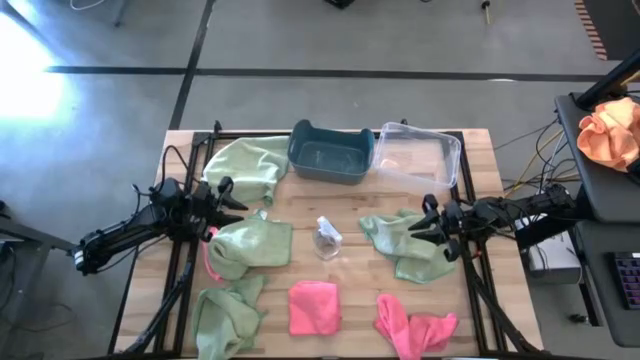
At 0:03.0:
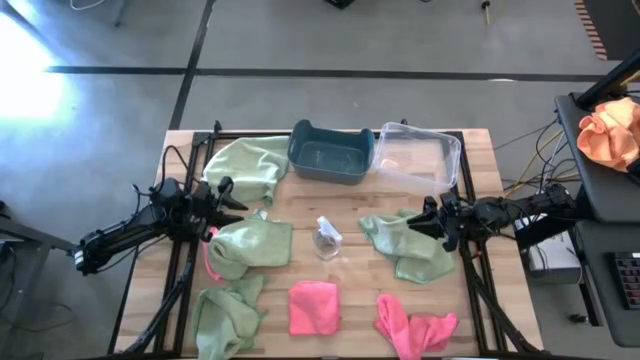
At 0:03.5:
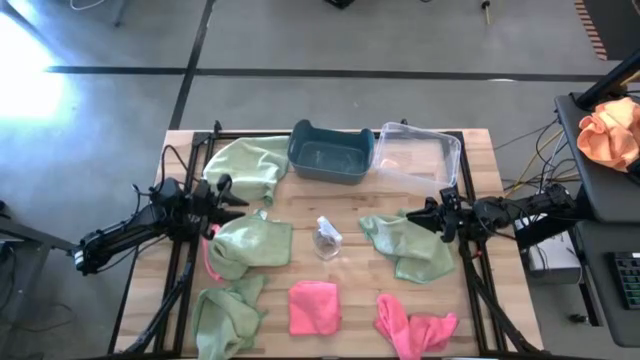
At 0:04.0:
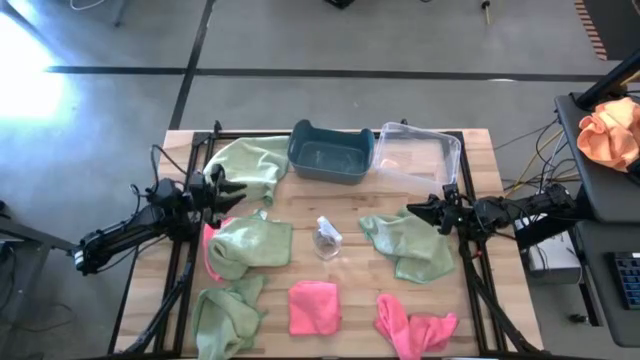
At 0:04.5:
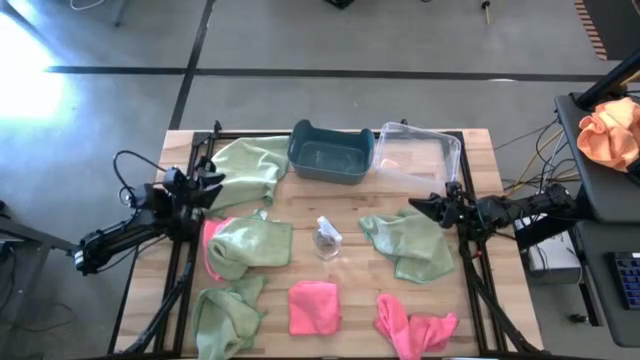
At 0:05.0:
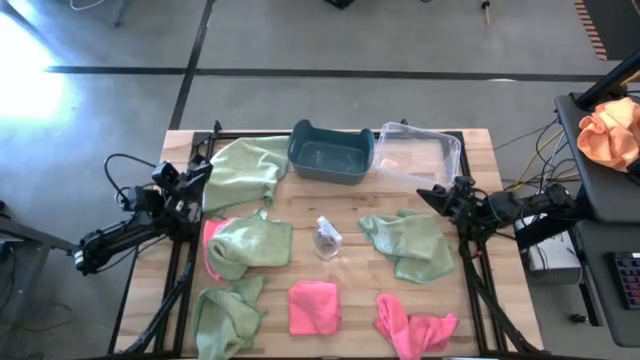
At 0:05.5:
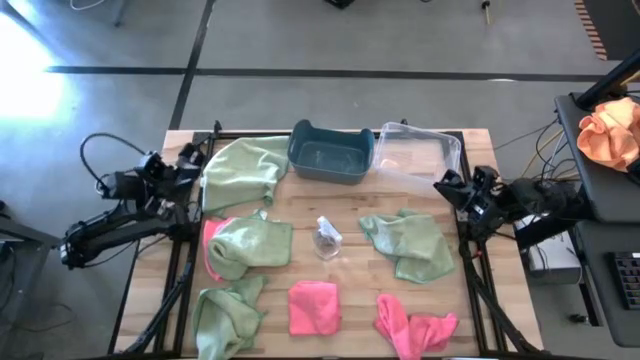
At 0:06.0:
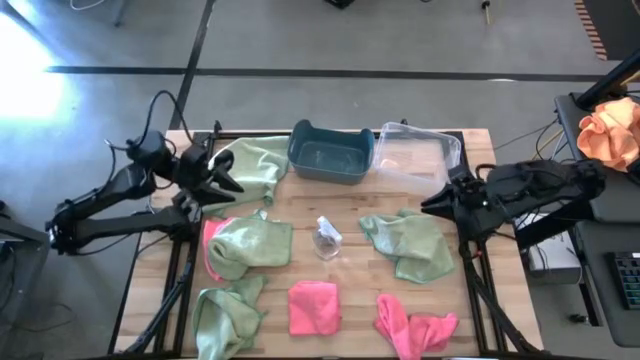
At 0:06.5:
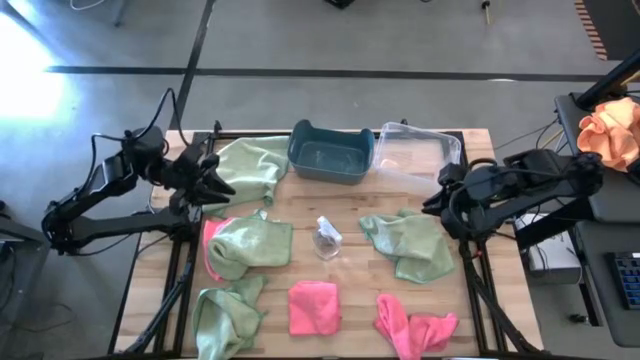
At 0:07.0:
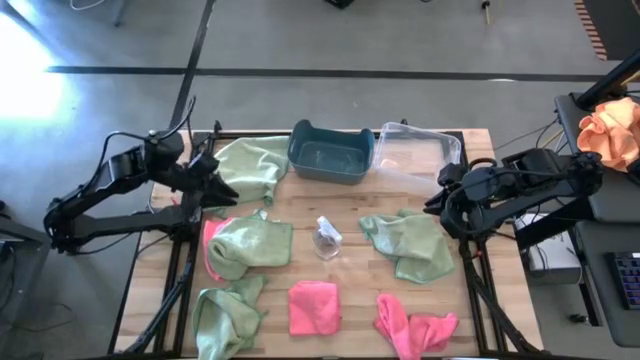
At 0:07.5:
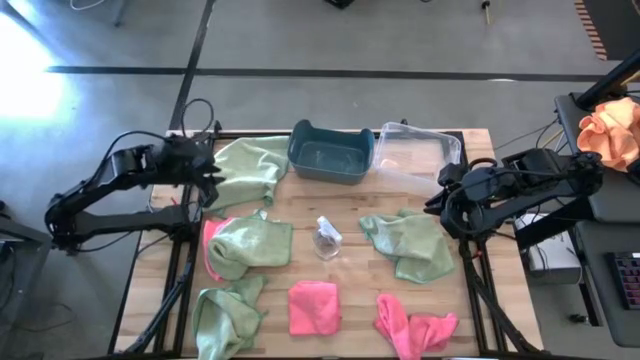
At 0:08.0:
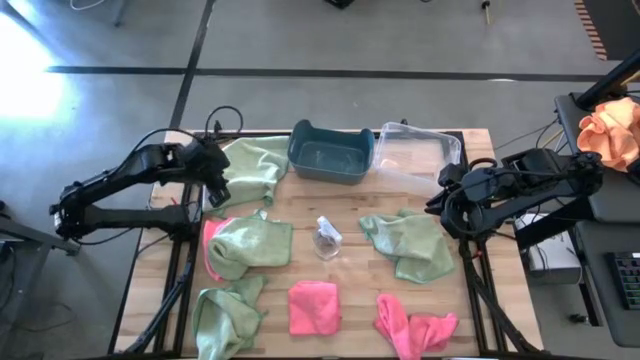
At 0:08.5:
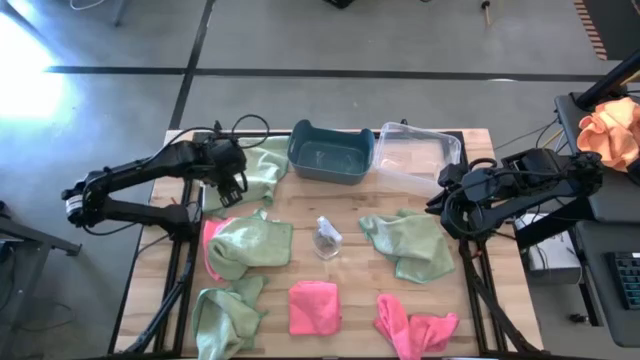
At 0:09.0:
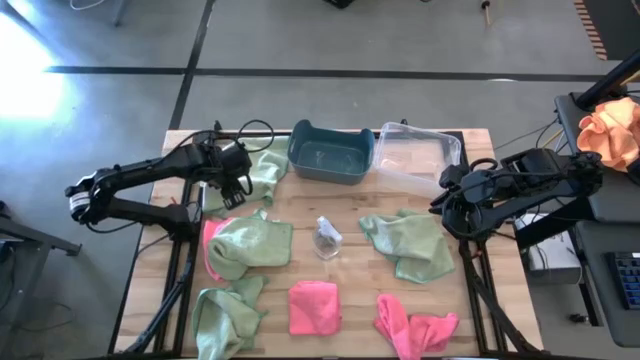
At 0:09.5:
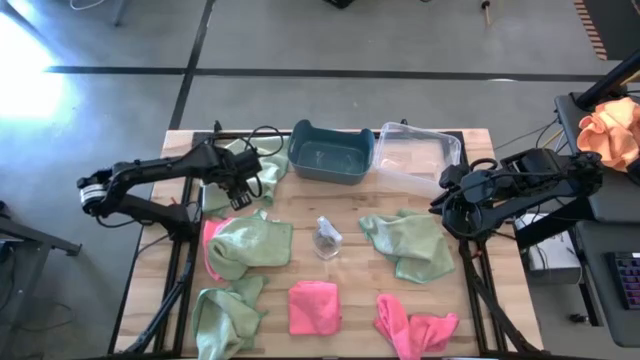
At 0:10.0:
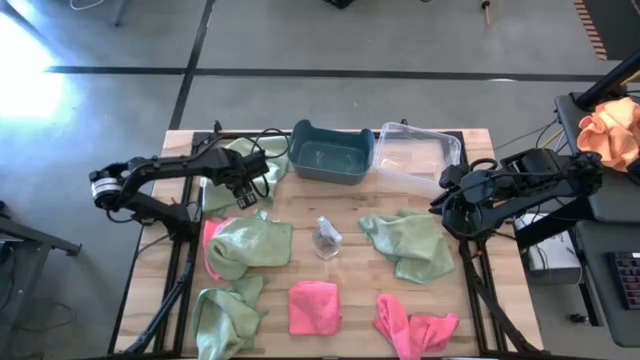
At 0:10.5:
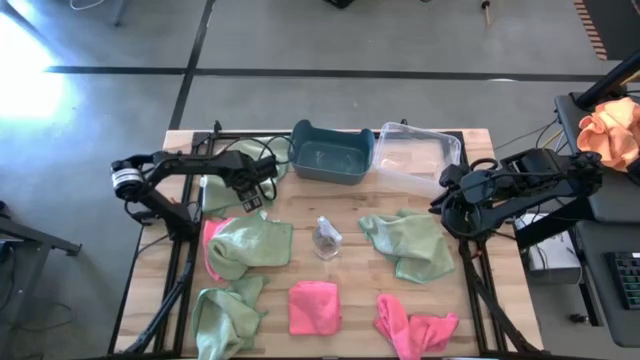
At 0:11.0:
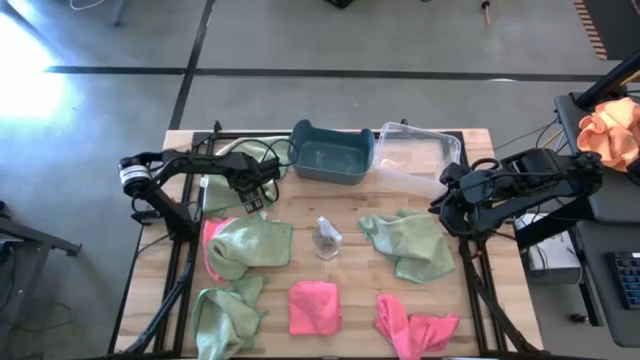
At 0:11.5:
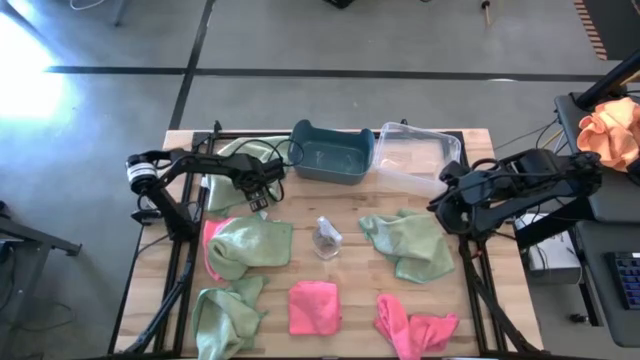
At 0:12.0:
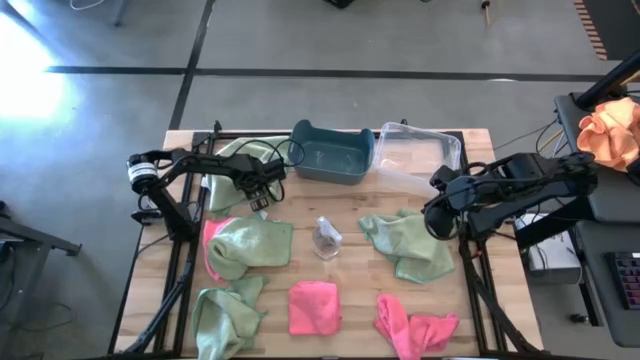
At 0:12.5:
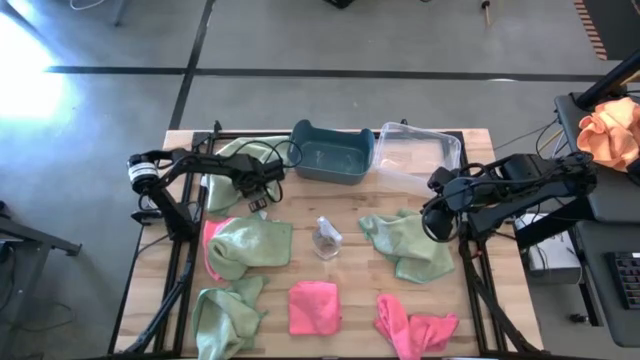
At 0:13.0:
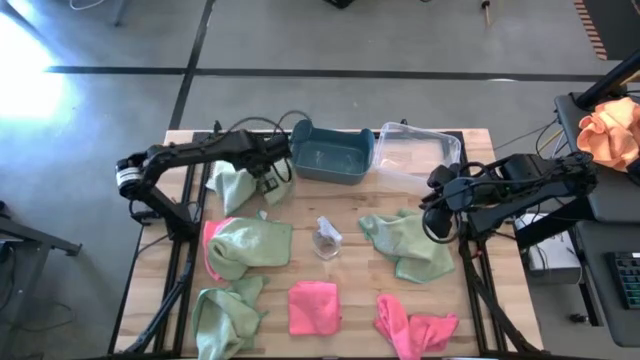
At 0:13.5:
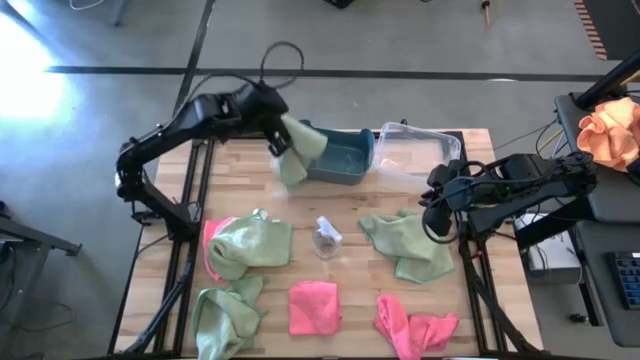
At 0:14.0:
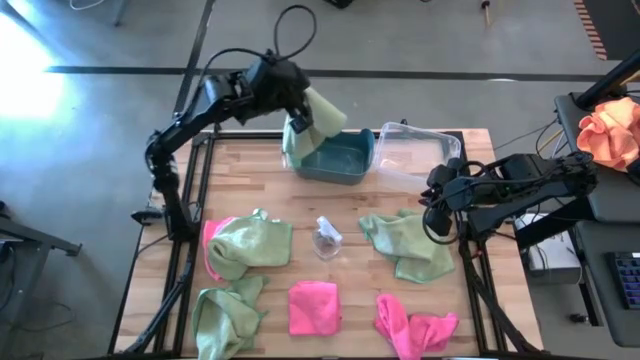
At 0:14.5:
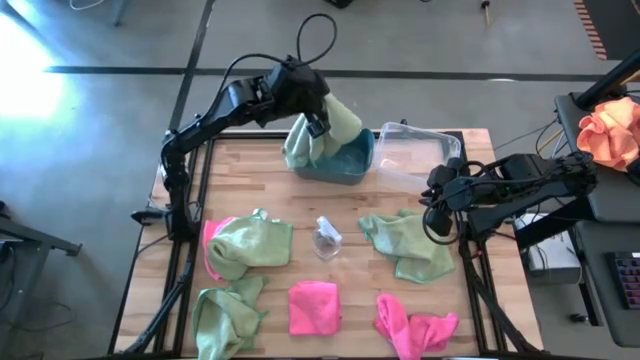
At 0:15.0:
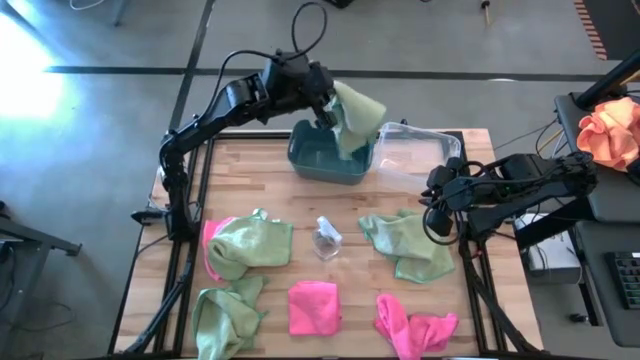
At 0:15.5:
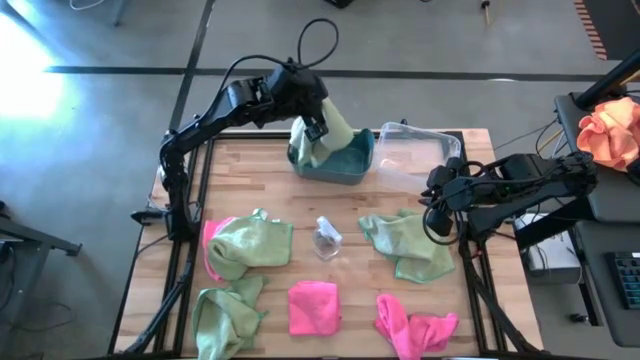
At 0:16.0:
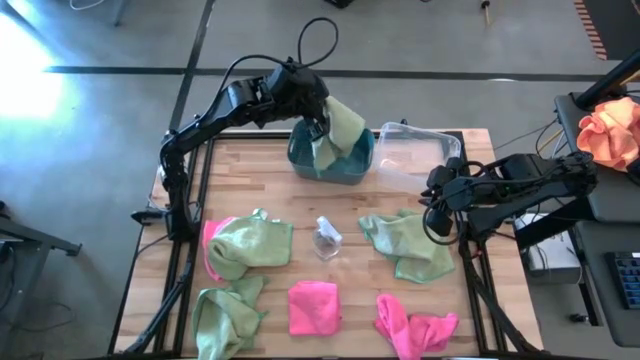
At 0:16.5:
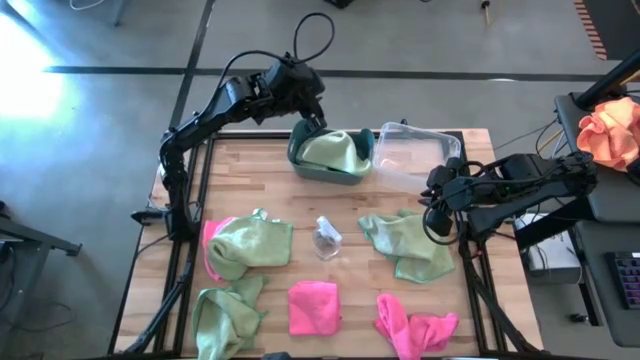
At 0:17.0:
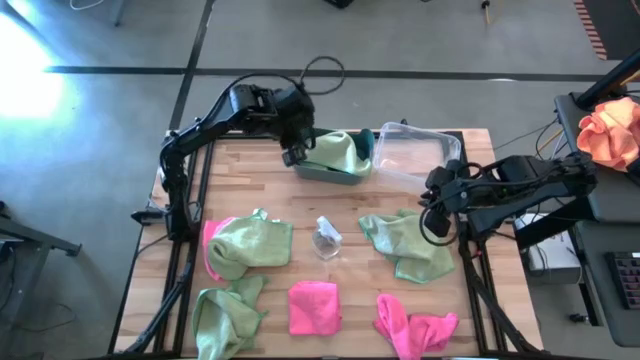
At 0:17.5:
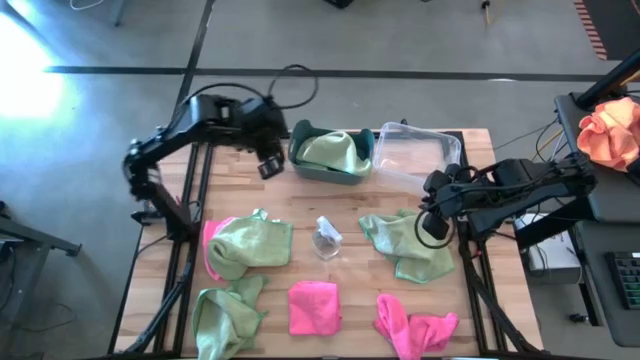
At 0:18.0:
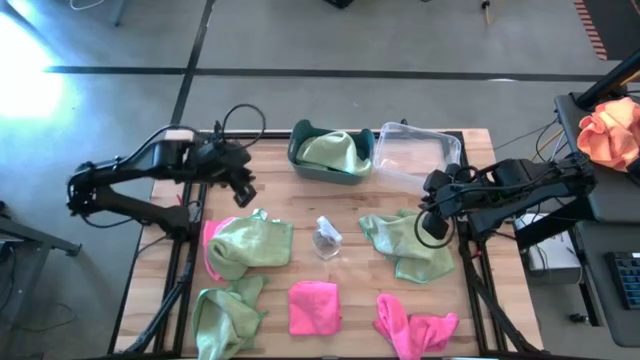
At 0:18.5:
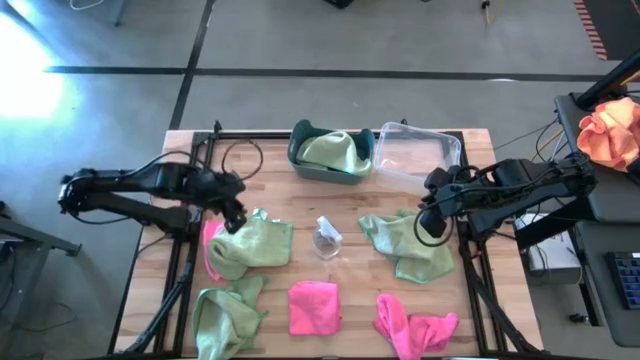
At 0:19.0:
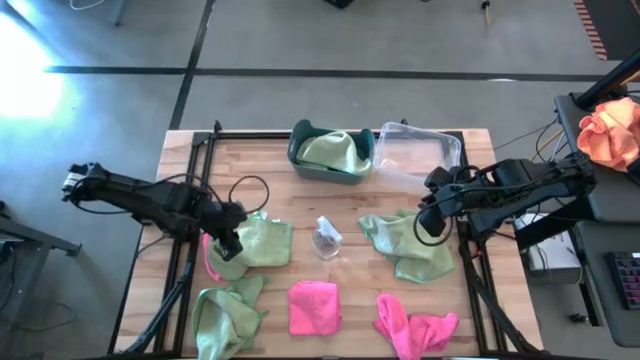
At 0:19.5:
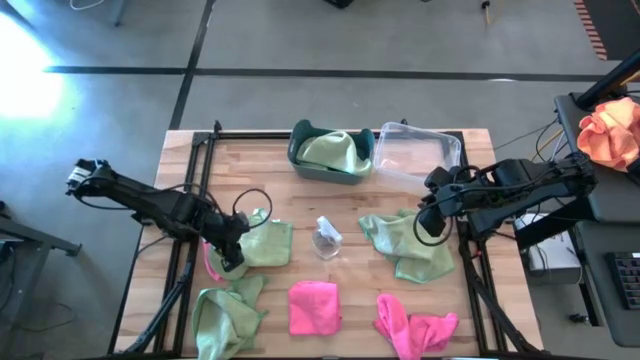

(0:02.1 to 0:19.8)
Task: Sort microfiber towel by color & place in baskets
Put the top left green microfiber cloth into the blue bin

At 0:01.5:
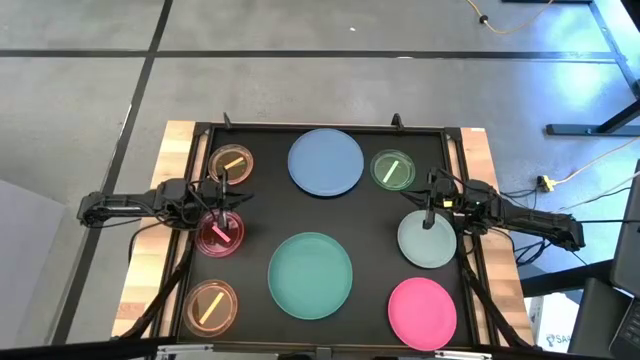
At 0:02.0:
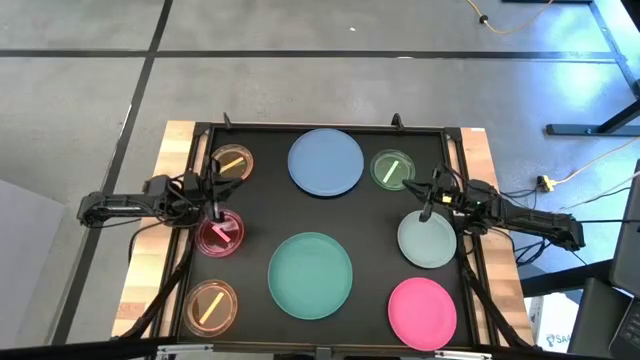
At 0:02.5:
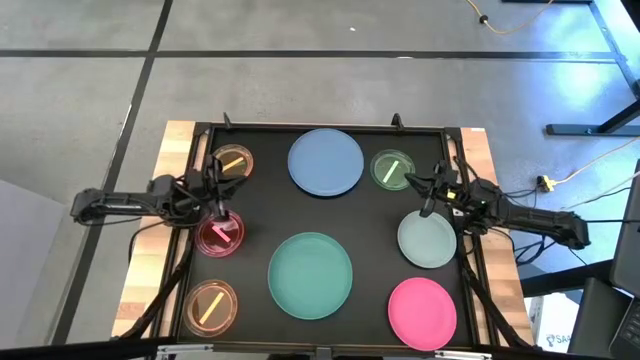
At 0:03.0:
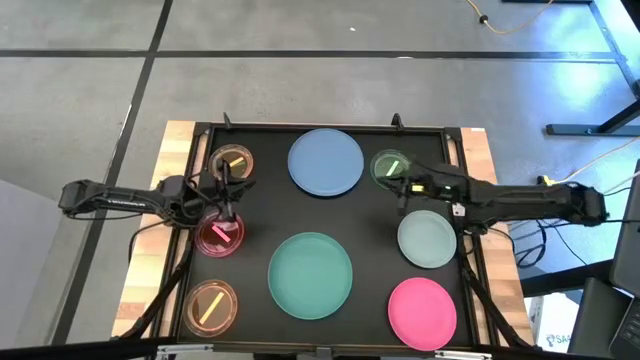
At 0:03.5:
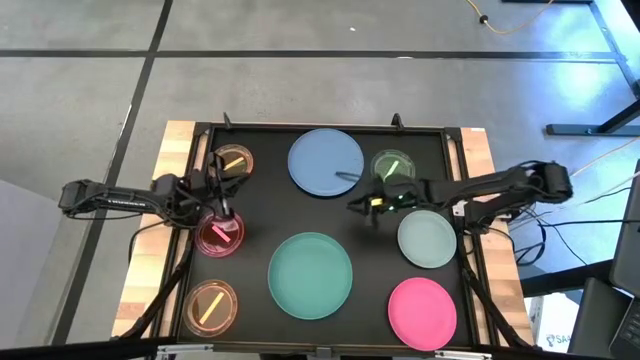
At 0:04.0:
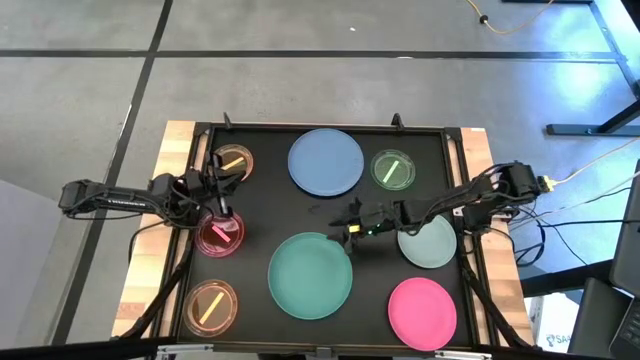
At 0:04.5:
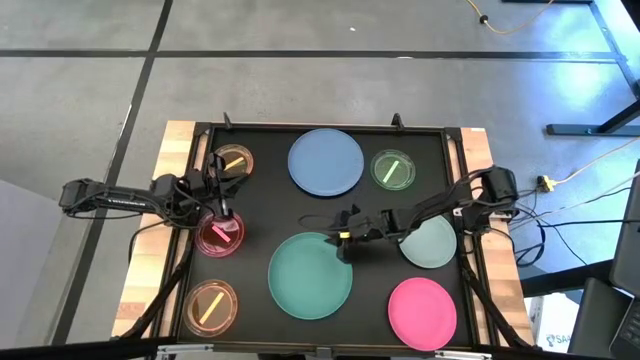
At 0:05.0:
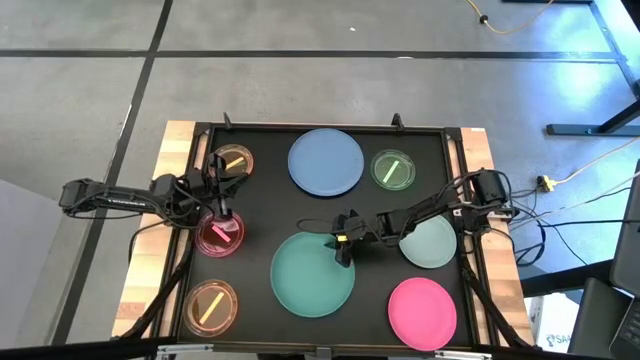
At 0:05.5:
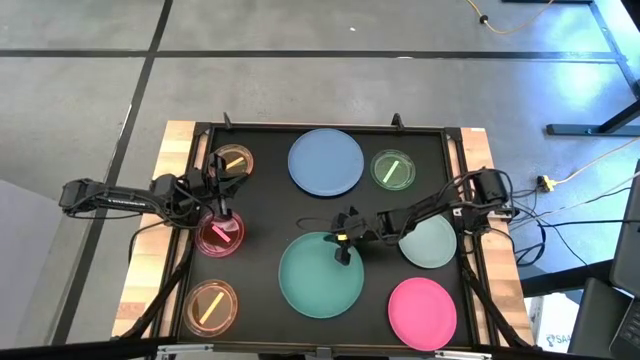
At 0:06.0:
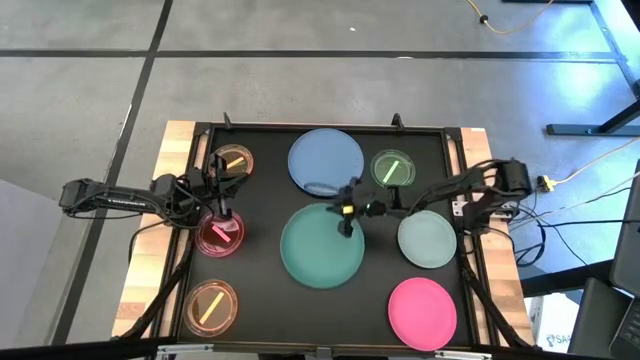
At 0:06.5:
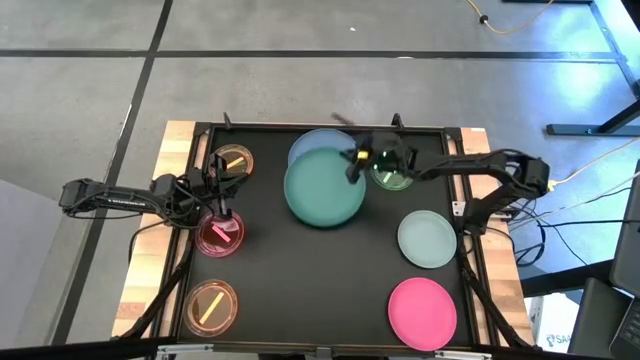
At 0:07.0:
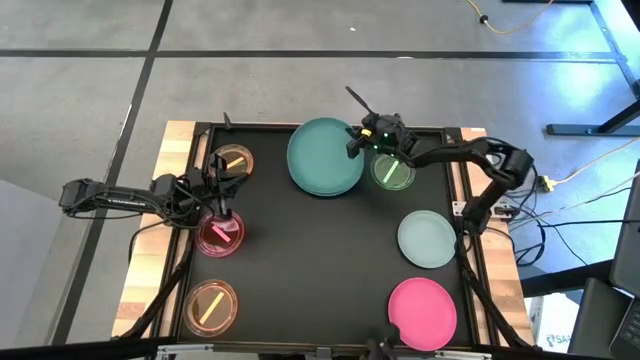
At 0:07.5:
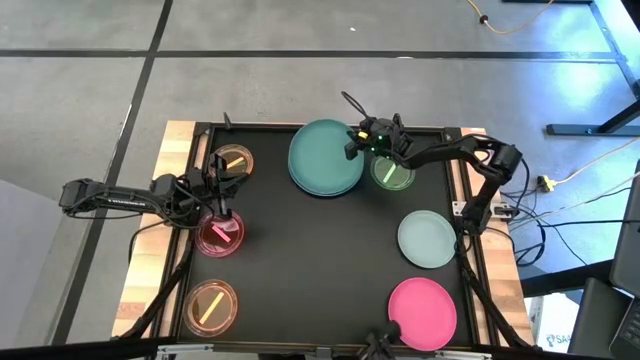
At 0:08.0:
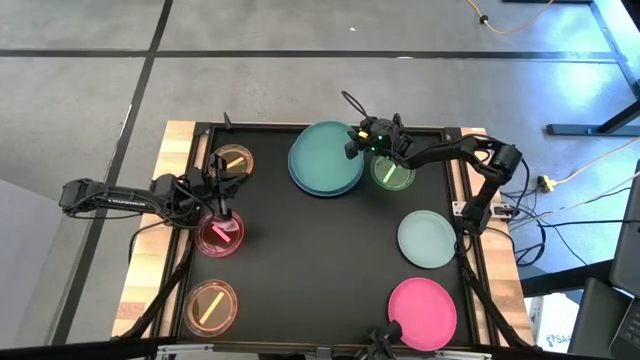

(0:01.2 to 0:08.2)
Task: Stack plastic plates
Stack the green plate on top of the blue plate
